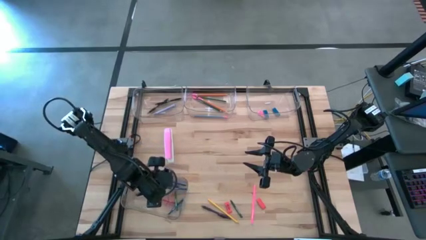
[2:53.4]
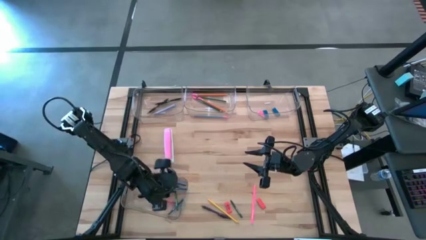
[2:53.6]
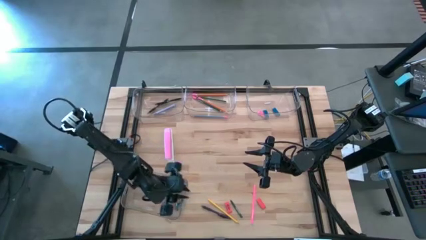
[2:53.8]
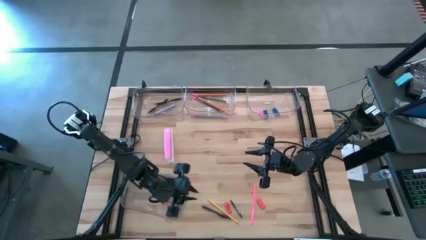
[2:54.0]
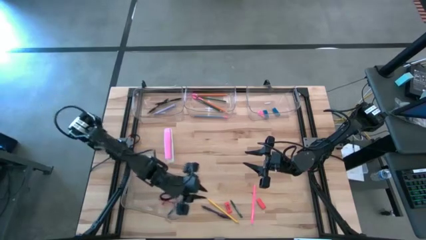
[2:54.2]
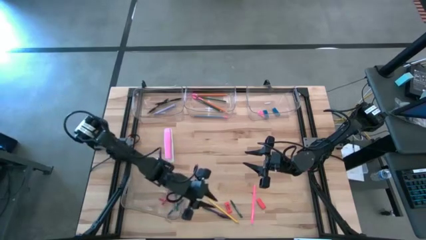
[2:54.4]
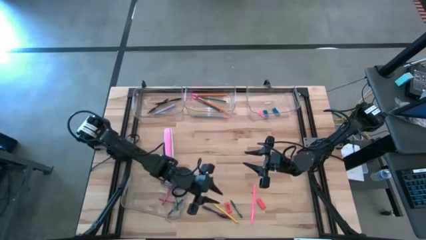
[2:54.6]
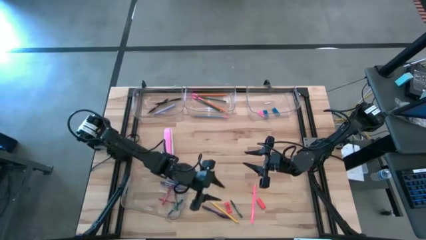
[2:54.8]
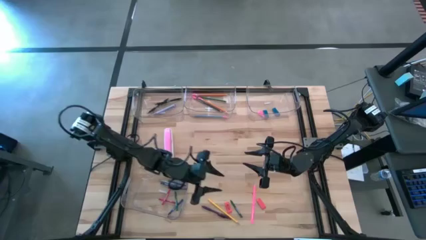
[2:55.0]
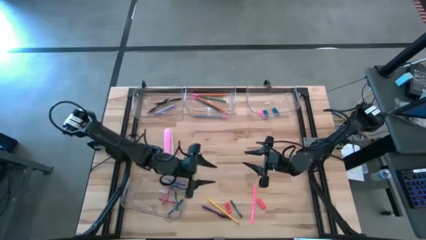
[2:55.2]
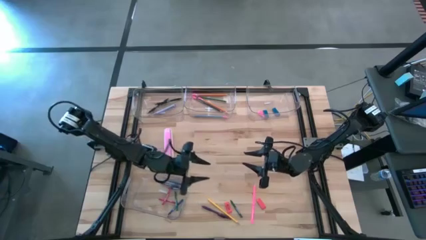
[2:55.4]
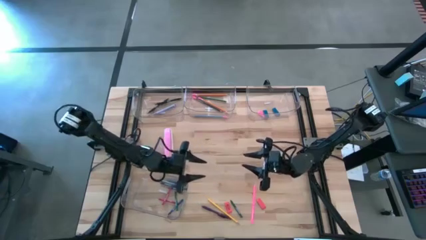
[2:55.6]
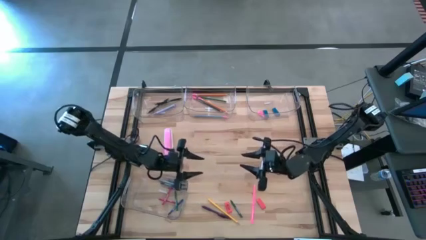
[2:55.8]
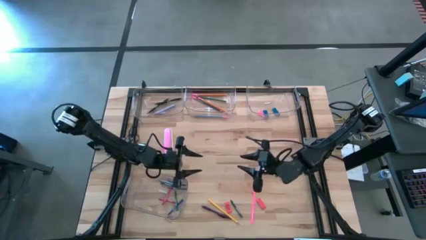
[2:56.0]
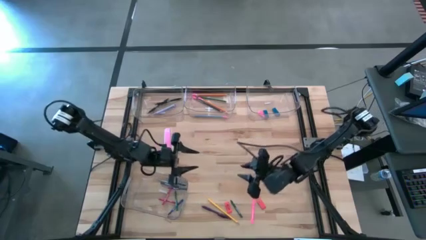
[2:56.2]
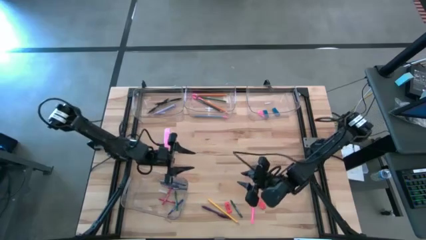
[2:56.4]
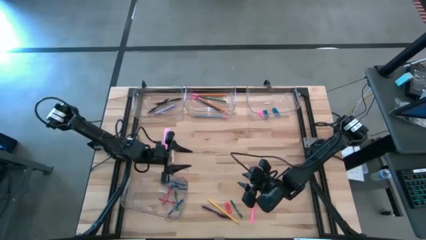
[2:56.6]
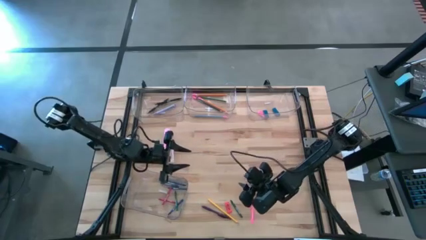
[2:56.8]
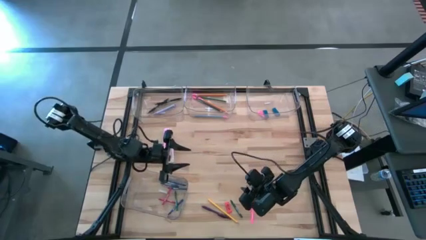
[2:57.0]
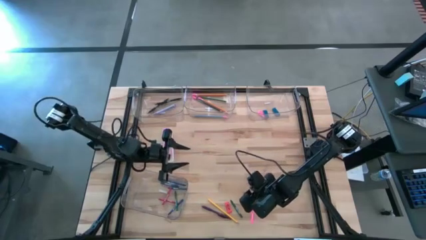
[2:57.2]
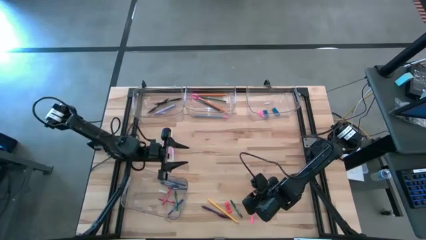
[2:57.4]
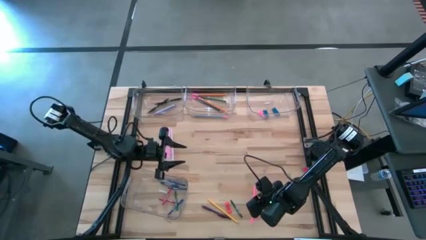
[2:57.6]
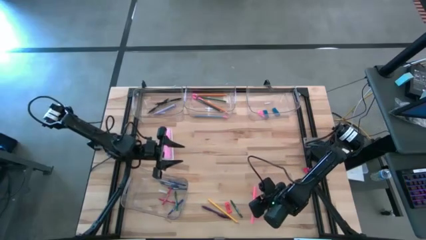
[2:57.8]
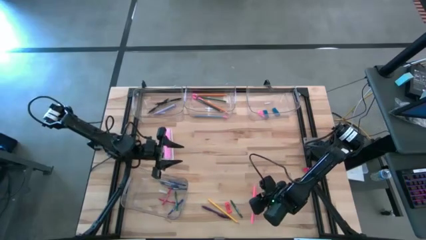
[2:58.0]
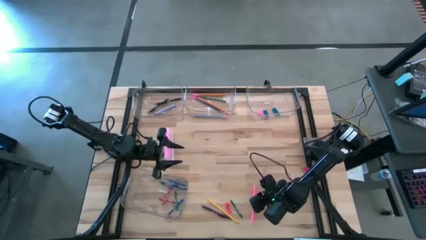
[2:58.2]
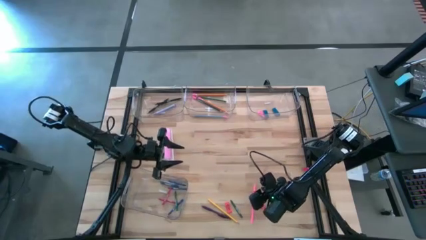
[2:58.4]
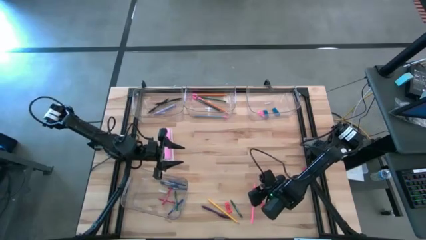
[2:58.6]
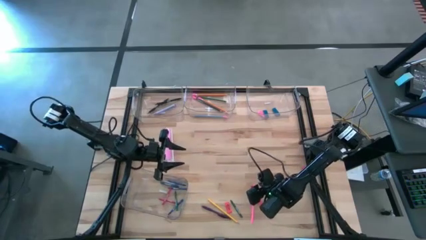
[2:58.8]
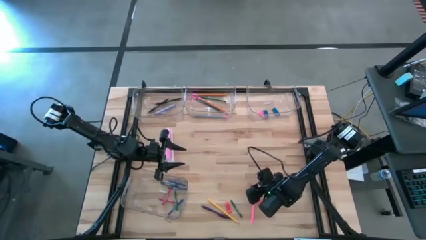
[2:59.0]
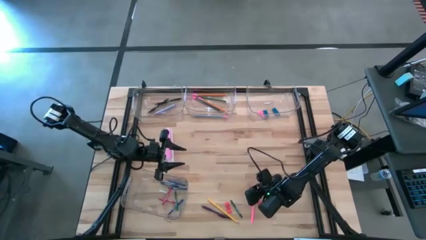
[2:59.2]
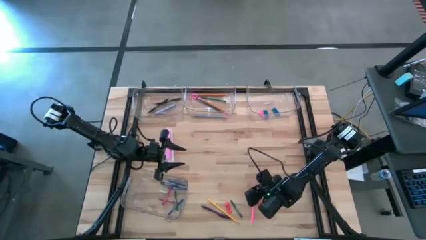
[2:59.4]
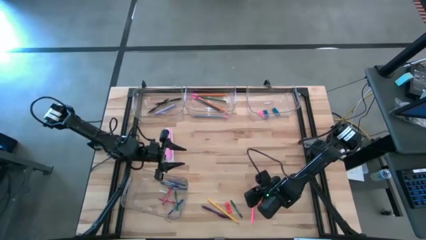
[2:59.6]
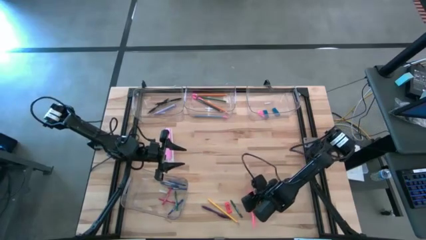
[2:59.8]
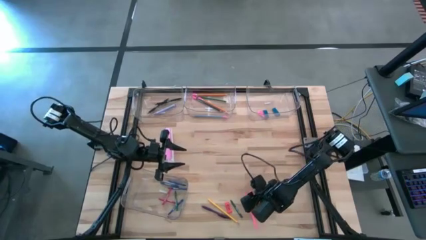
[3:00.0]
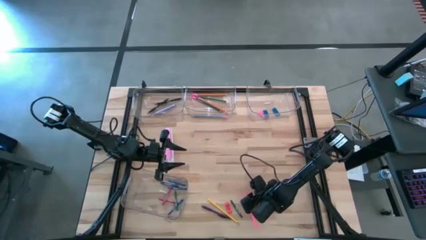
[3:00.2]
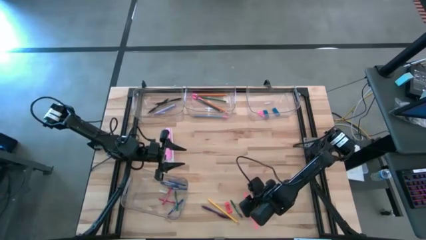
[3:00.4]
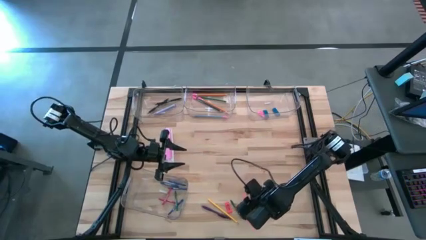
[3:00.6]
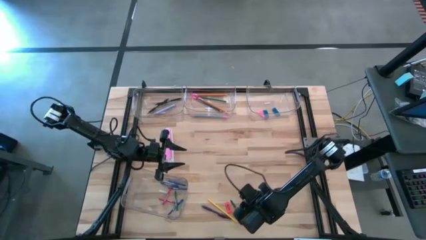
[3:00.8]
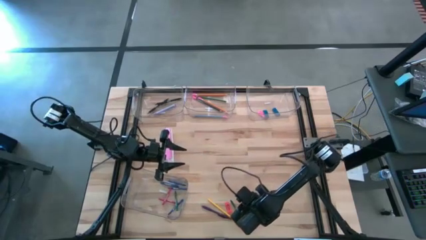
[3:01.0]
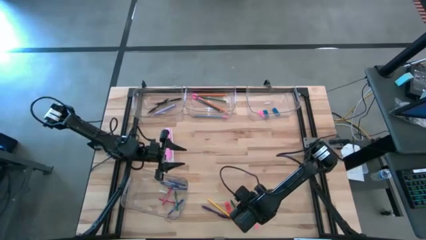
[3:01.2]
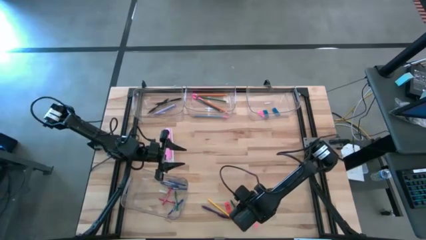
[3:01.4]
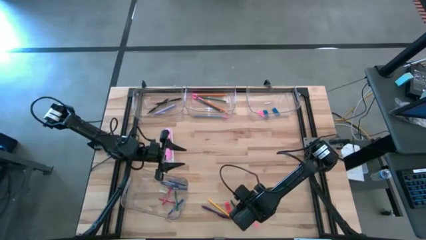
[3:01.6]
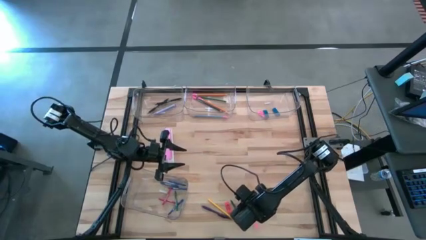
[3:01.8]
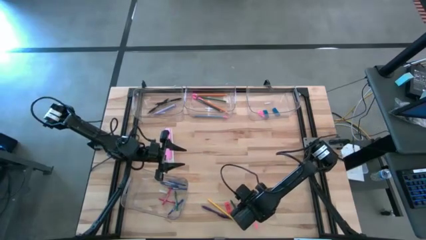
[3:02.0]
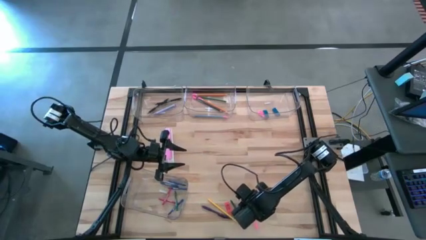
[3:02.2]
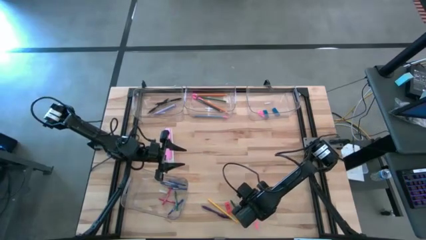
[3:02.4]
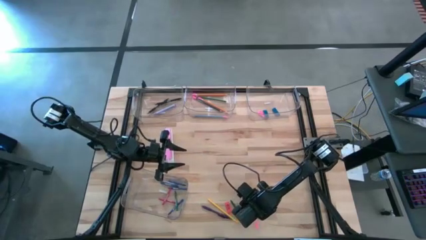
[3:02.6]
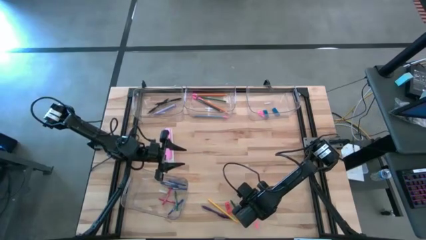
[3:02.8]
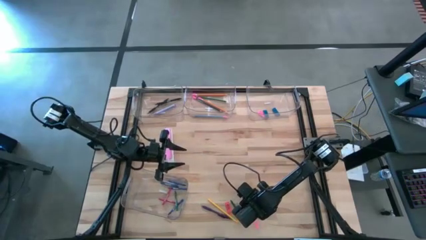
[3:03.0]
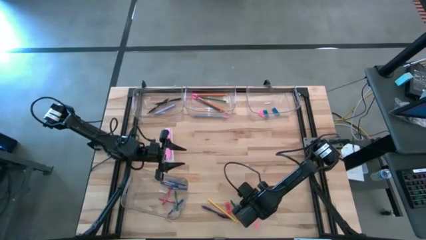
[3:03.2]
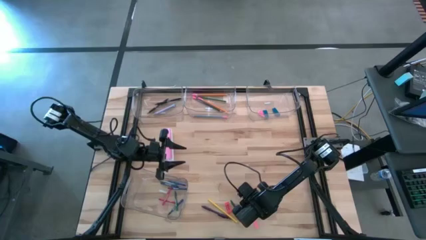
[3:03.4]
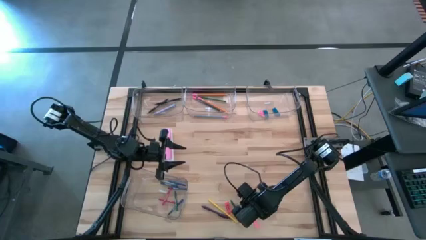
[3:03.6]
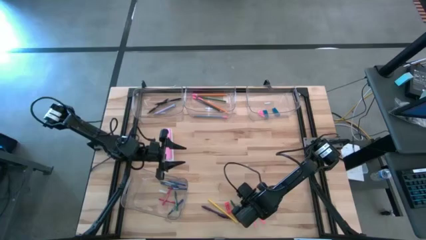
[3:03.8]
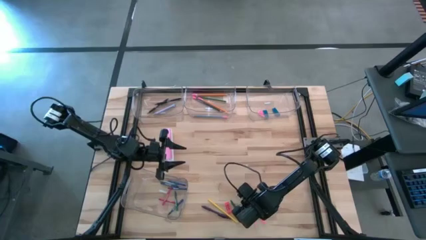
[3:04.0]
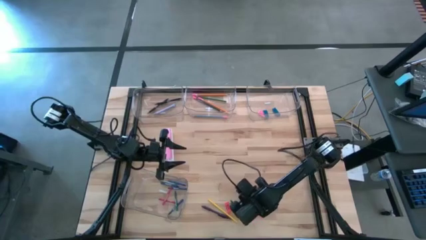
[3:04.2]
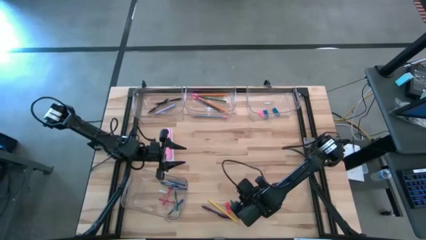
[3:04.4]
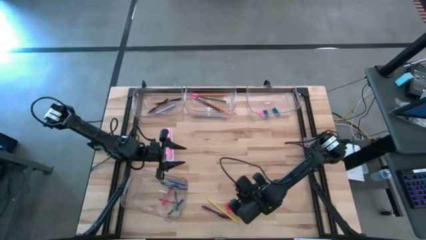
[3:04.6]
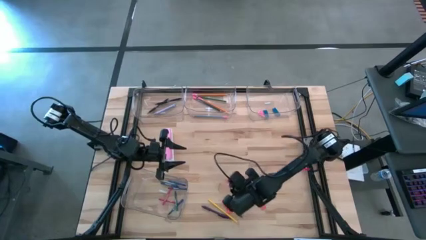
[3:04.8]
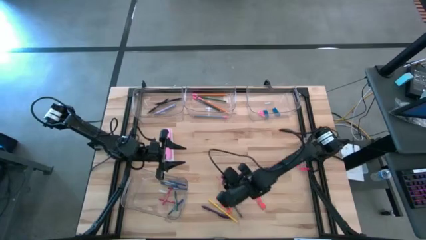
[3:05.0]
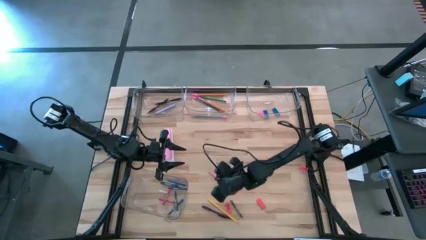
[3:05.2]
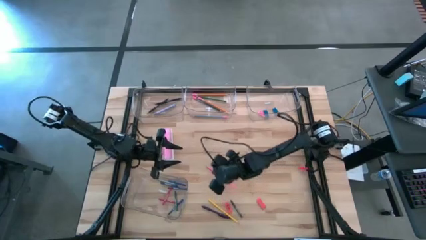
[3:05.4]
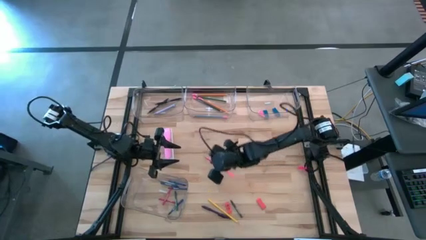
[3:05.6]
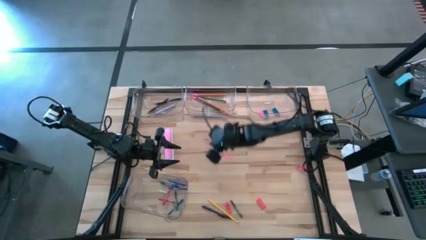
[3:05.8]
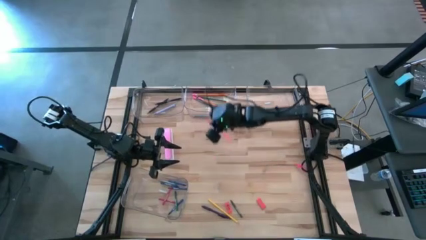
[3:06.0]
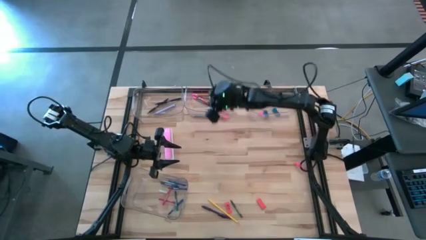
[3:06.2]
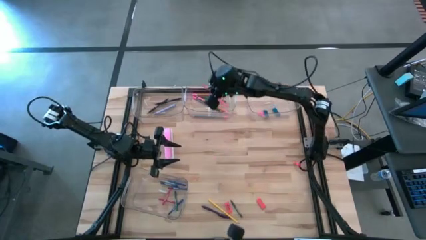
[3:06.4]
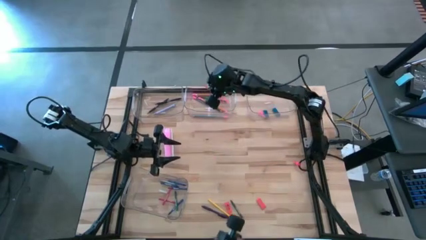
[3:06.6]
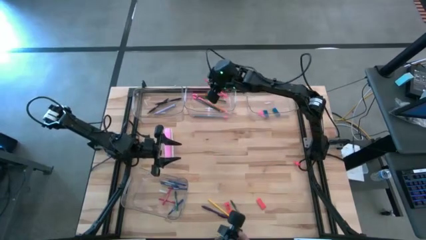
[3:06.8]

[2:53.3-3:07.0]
Task: Sort crayons/erasers/pens/pencils in bins
Put the pink pencil into the top middle transparent bin
